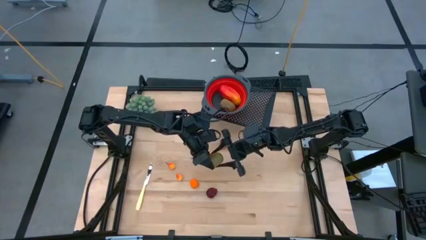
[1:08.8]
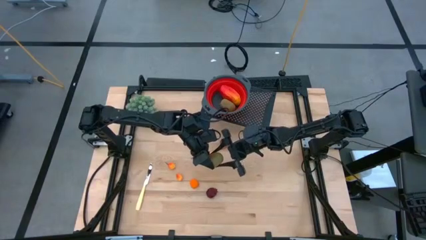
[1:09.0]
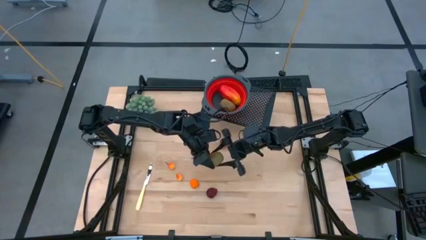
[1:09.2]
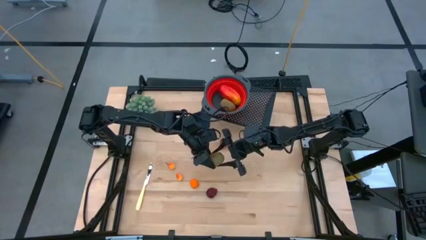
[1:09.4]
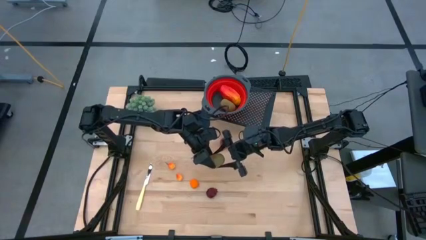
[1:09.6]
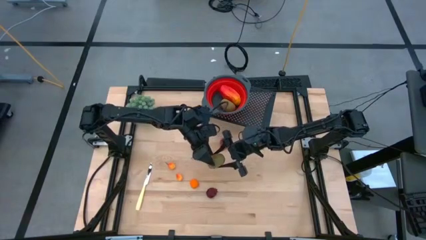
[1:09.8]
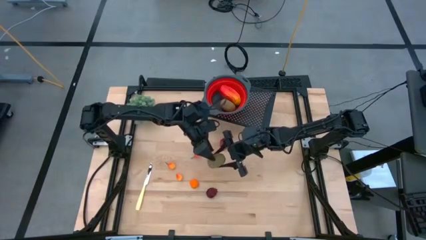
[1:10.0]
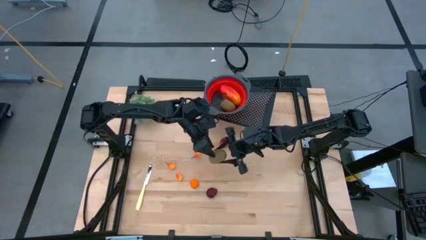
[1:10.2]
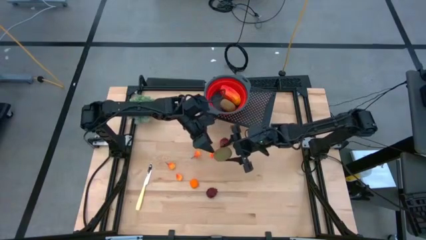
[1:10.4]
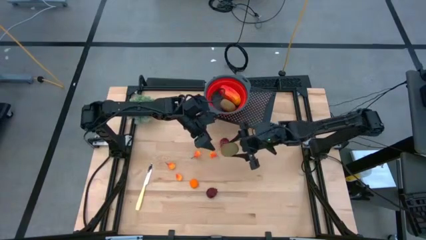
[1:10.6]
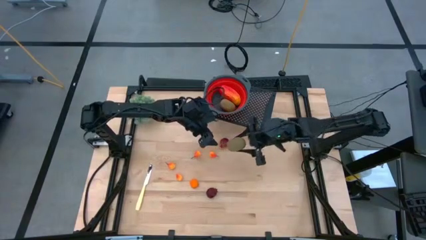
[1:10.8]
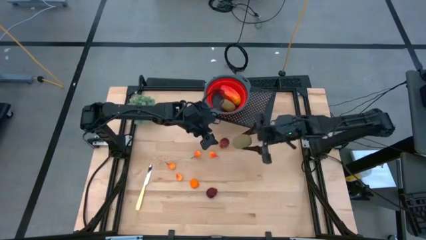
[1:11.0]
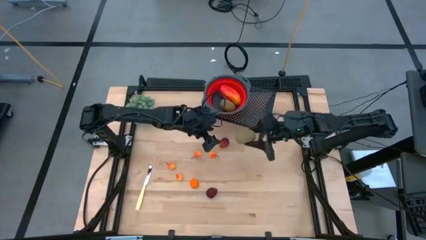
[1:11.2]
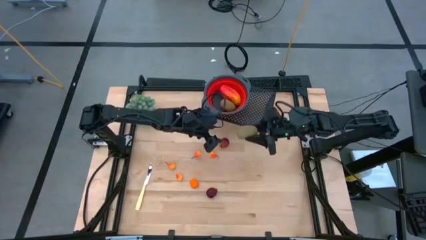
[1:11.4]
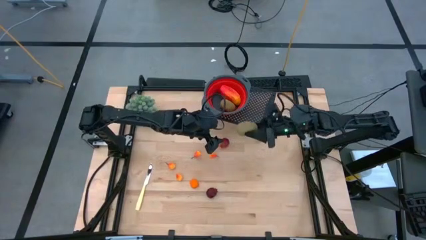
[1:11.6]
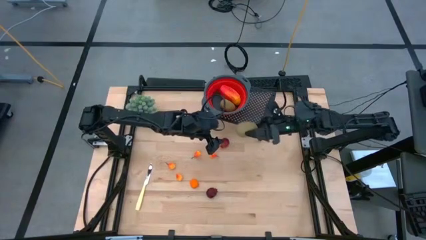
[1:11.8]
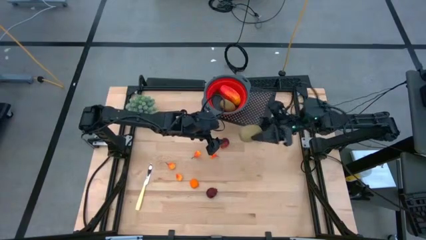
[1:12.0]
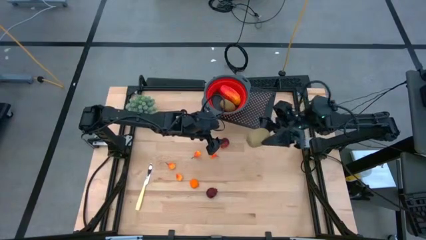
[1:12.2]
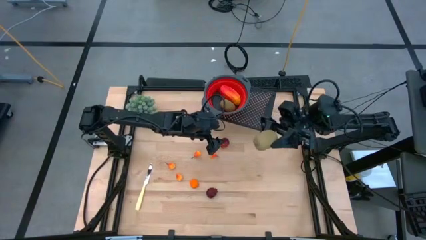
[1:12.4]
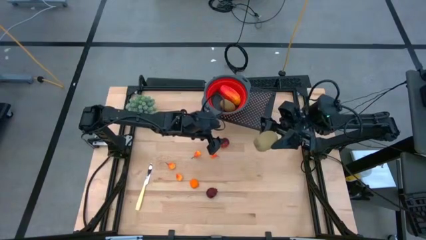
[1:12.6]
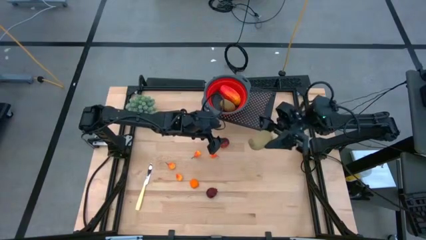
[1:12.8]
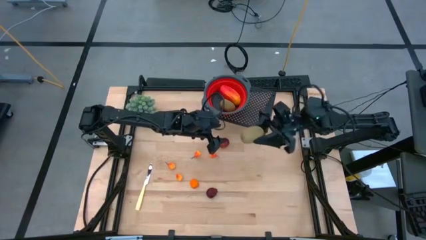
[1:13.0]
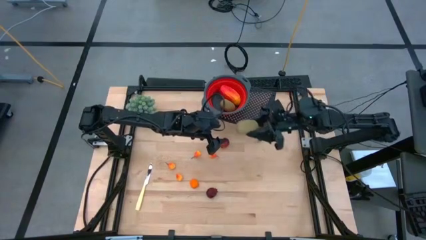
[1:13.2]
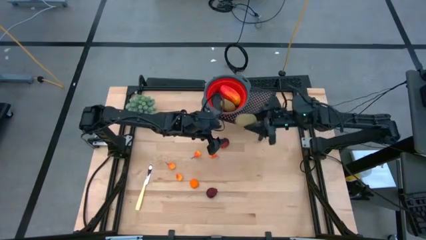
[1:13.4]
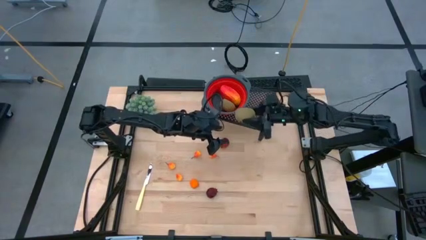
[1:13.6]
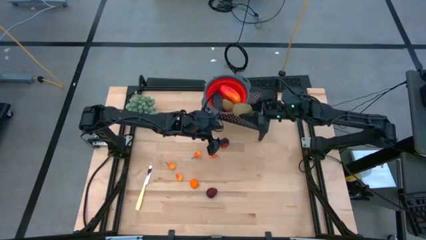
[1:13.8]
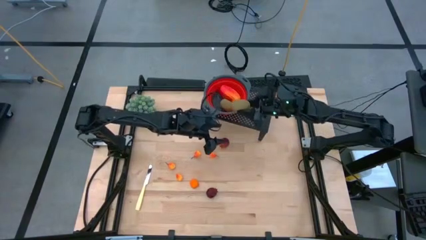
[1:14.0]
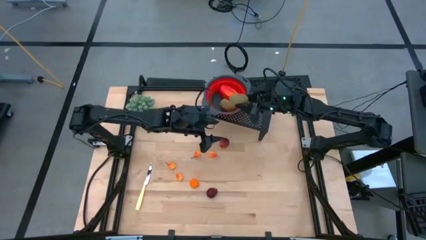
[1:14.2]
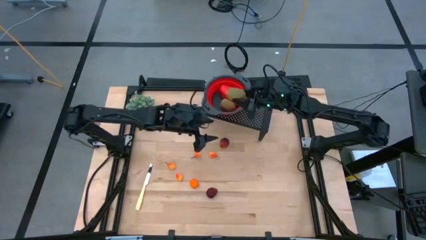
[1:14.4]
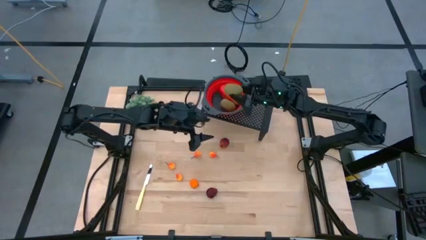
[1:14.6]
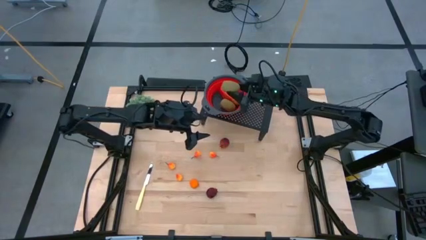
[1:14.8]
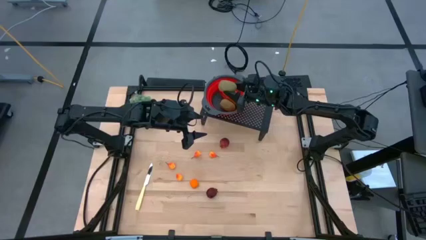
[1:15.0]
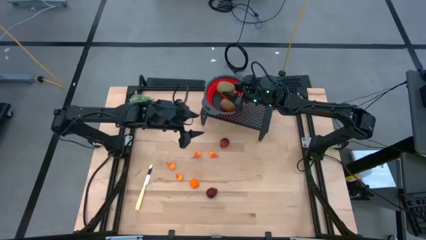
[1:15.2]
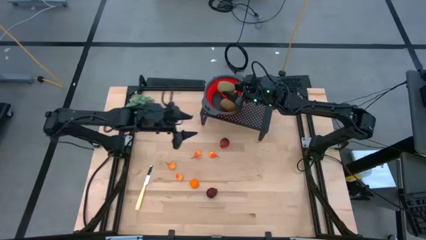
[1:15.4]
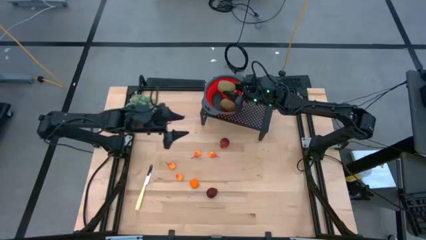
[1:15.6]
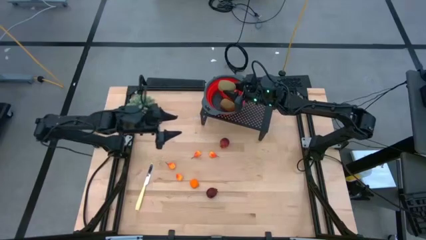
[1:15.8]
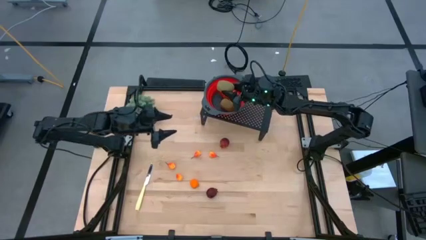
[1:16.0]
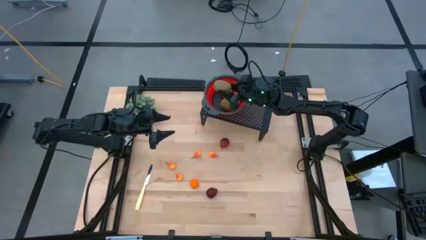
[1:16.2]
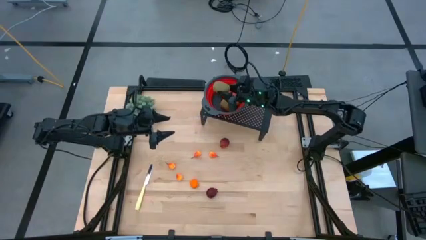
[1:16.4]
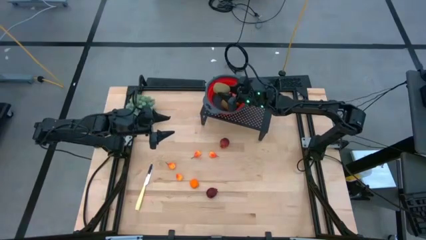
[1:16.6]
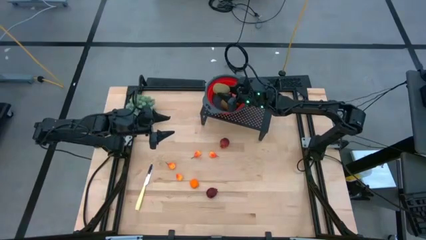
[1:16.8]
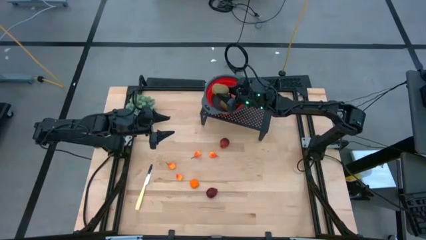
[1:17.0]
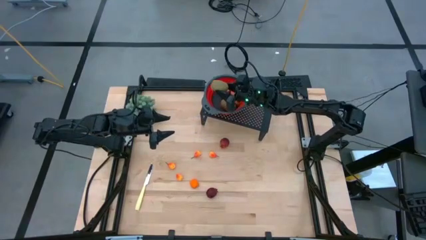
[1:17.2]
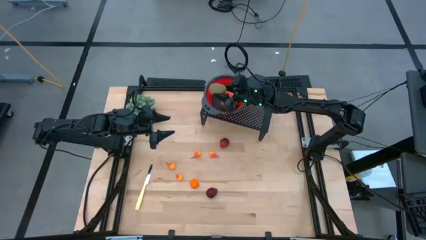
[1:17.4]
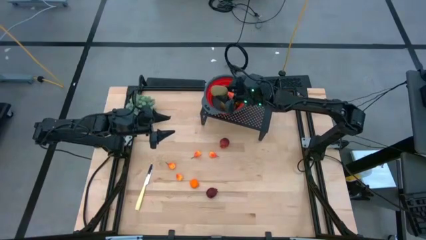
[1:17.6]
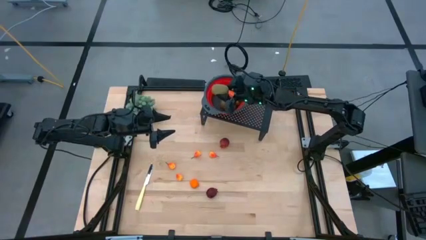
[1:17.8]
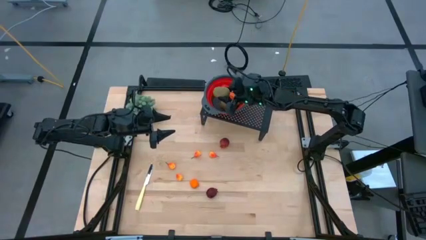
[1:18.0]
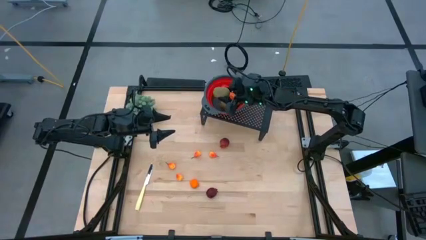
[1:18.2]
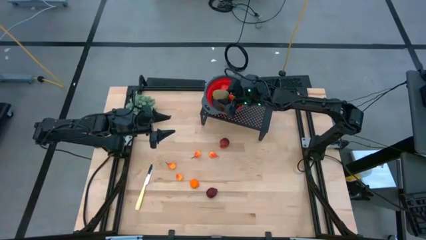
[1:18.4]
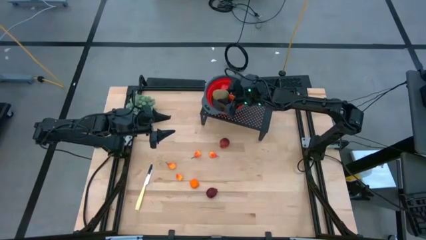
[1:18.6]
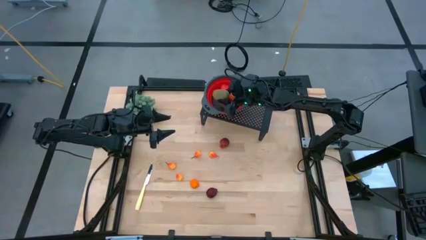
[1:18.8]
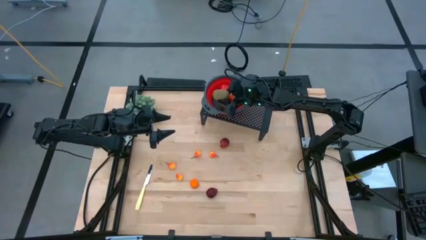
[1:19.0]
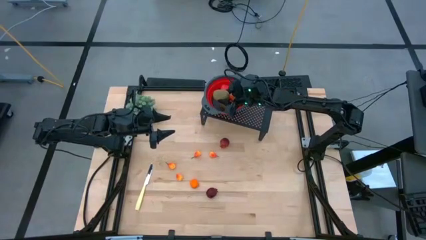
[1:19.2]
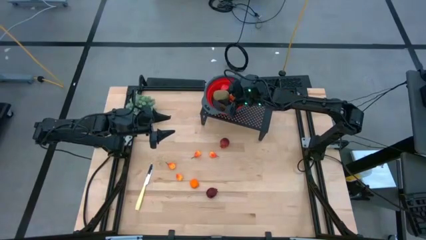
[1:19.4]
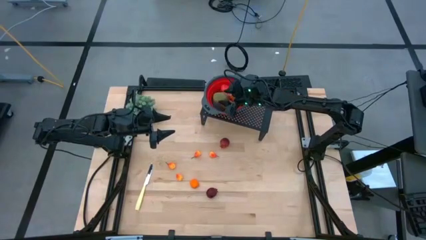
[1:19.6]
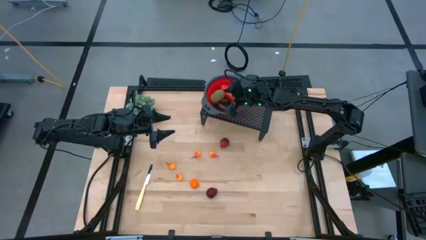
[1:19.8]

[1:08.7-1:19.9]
Task: Pick & Place Fruit
Put the kiwi into the red strainer bowl on the shelf
